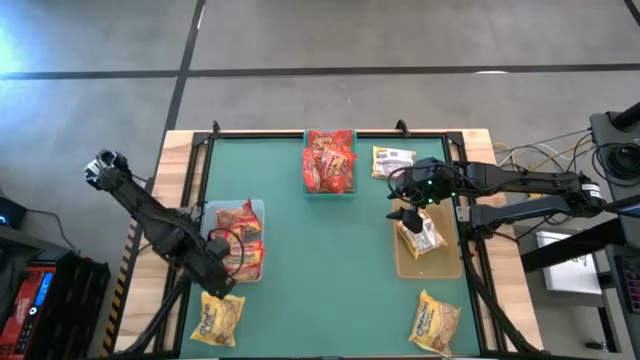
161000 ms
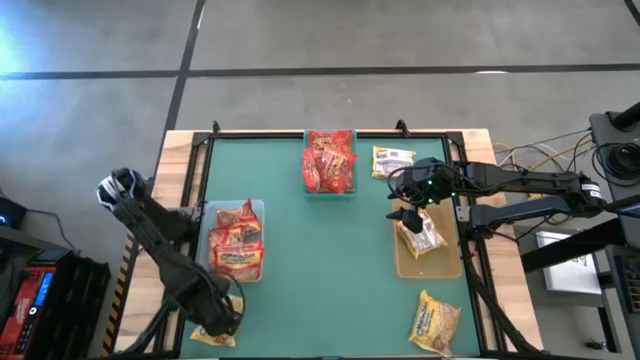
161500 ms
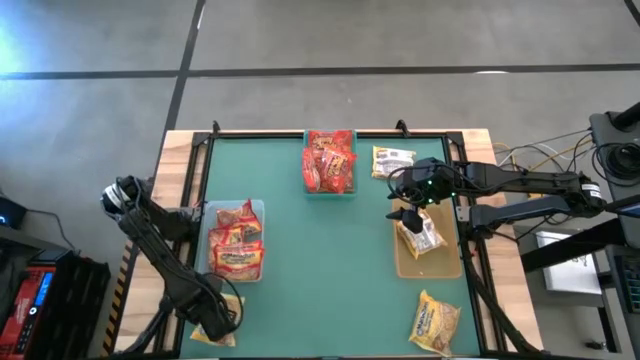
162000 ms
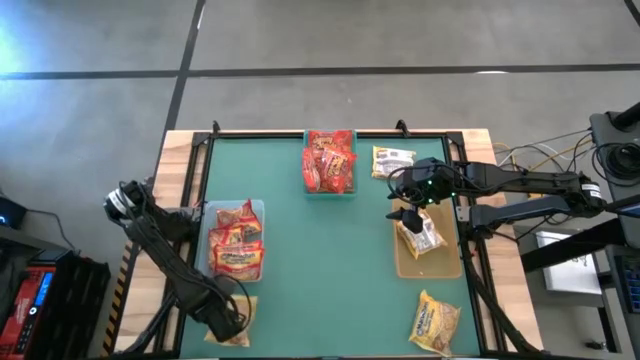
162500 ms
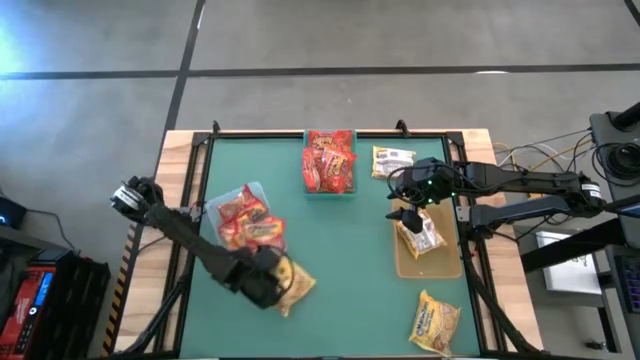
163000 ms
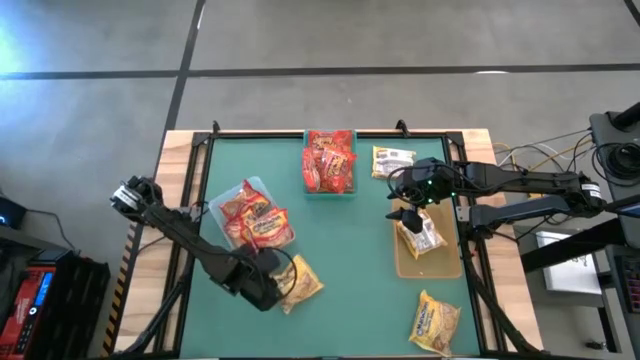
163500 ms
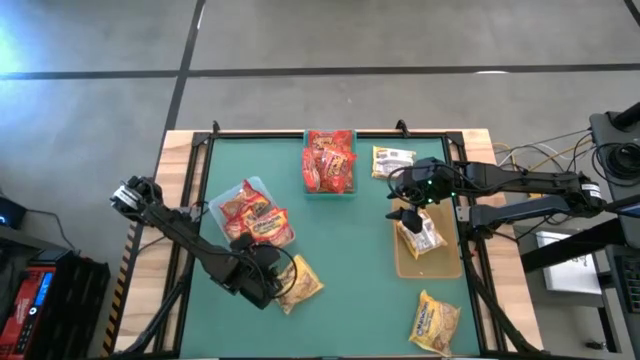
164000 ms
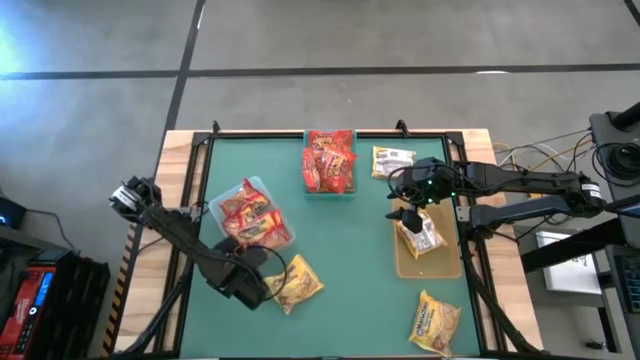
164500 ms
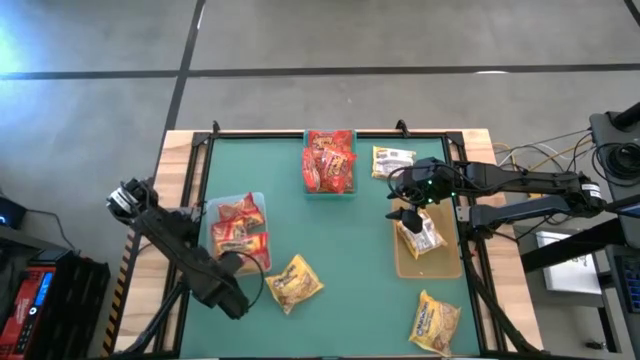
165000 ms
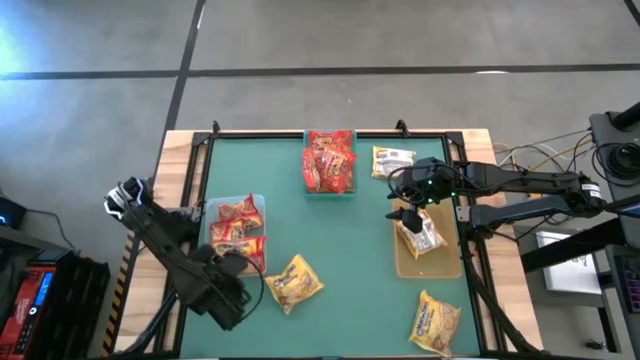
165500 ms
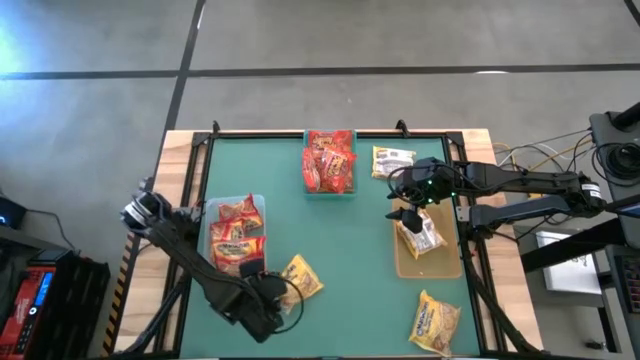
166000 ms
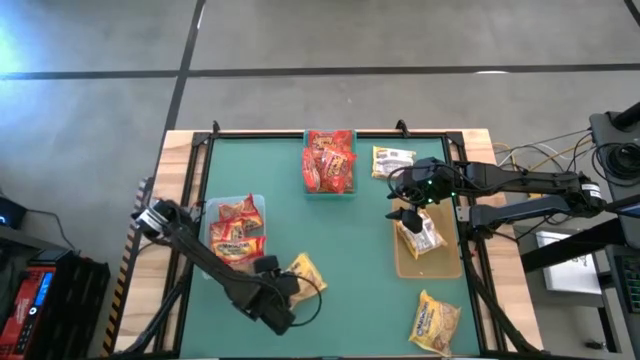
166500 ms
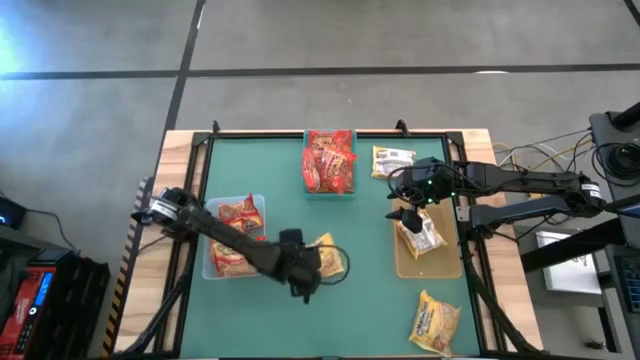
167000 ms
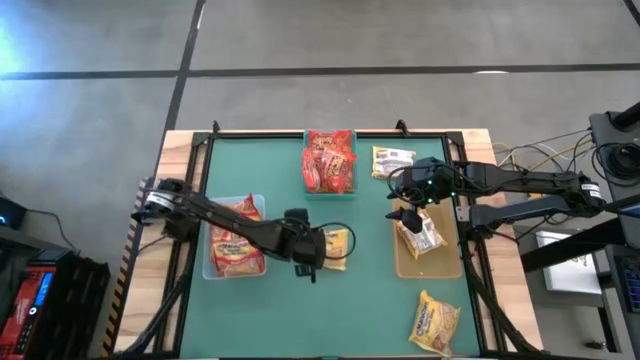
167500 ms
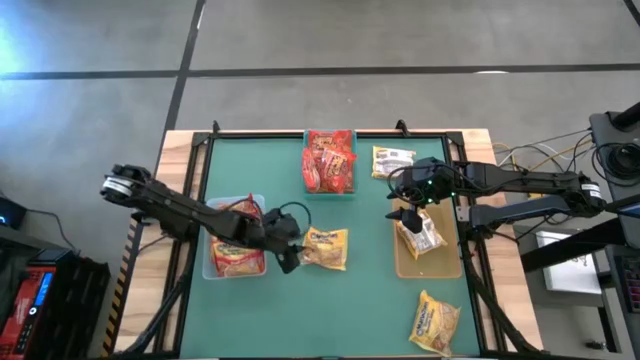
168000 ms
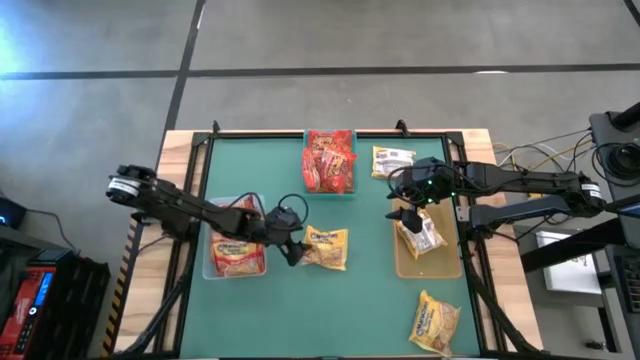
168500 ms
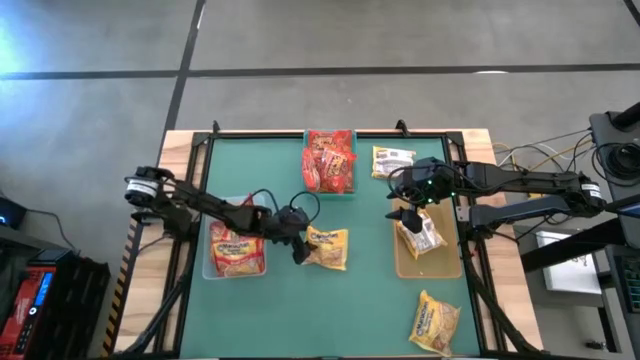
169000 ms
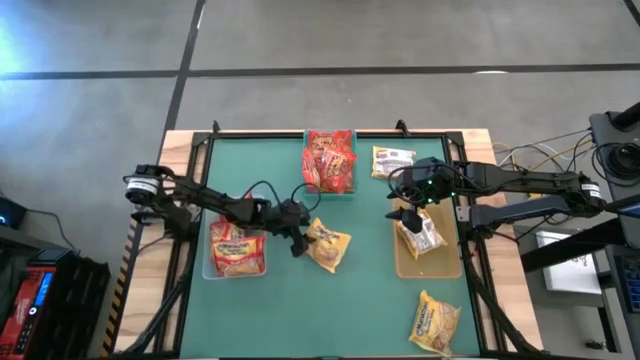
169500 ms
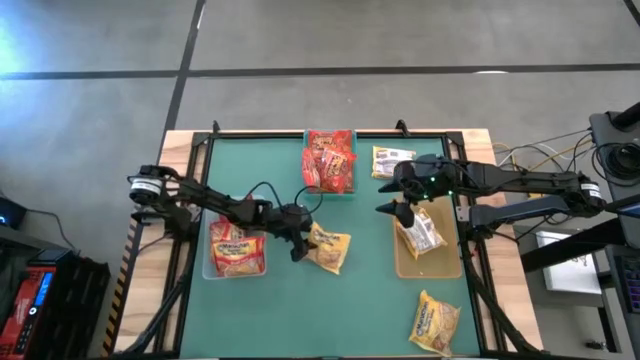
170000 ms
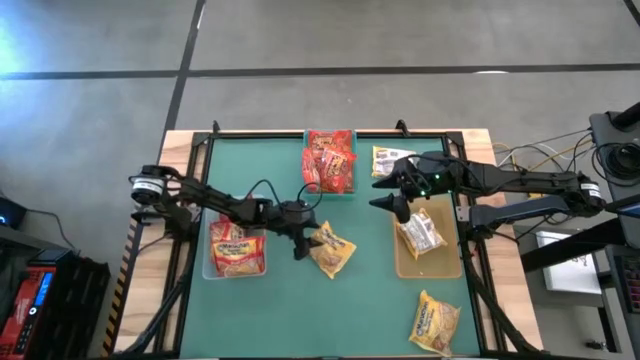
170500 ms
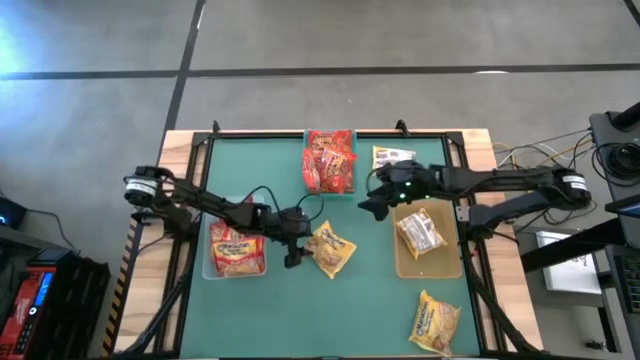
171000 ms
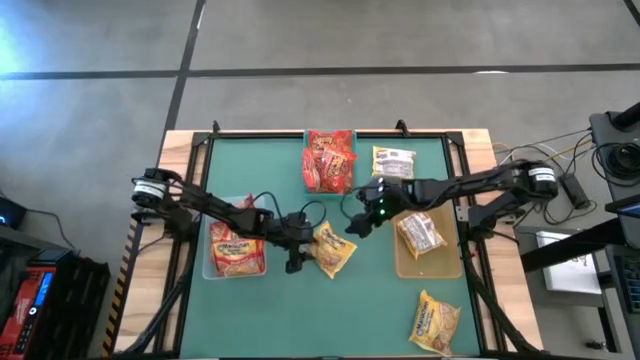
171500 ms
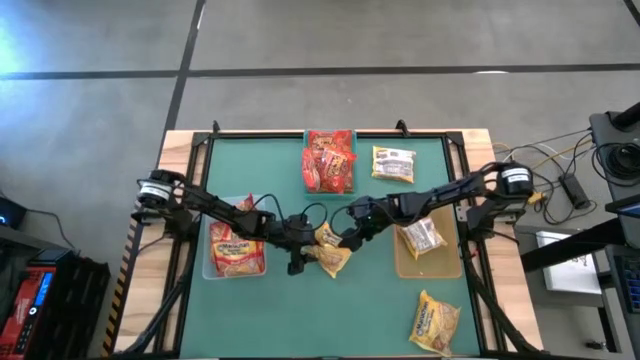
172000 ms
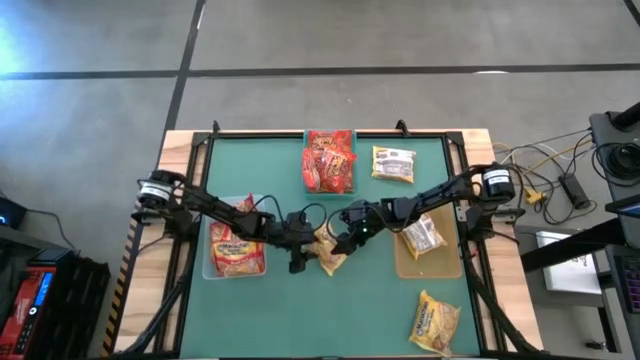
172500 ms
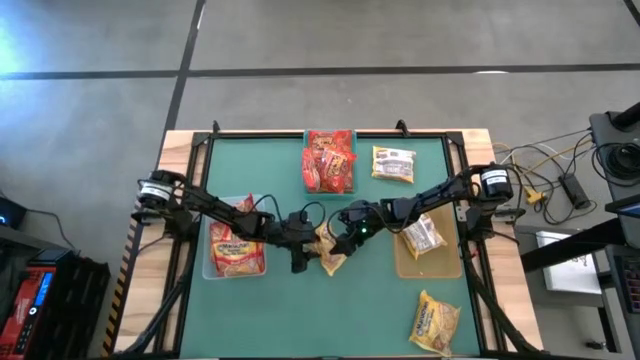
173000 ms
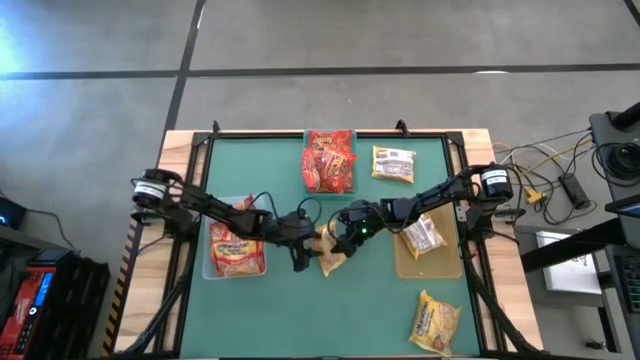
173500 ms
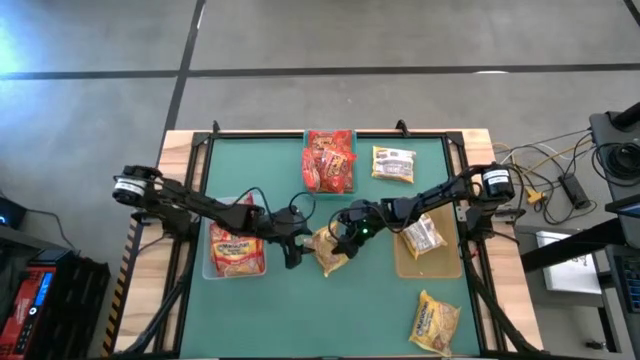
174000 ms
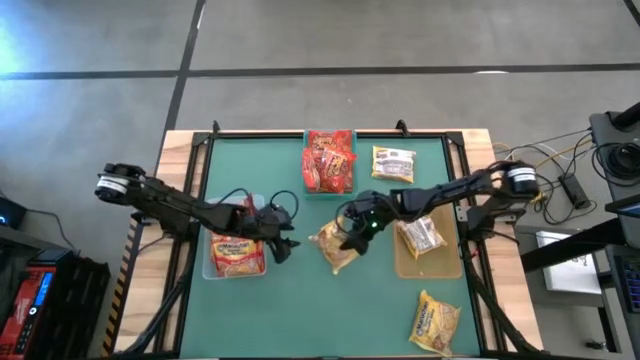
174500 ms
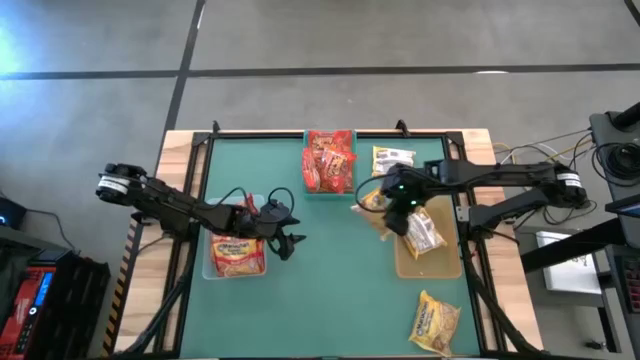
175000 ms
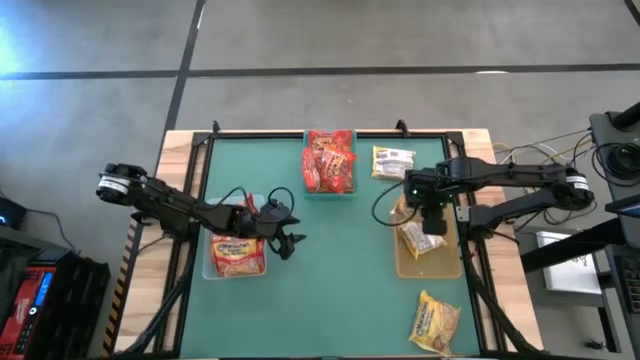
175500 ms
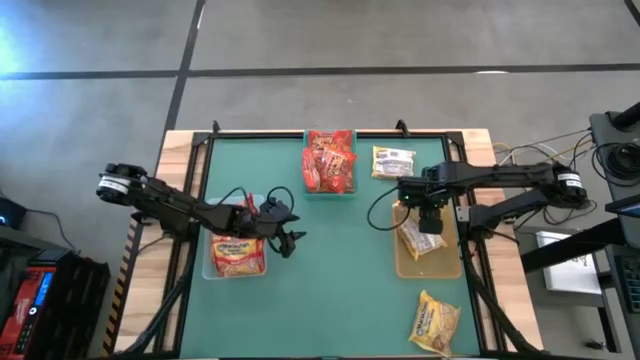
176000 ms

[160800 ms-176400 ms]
Task: Sort Maruchan noodles
Put the yellow noodle pack into the yellow bin

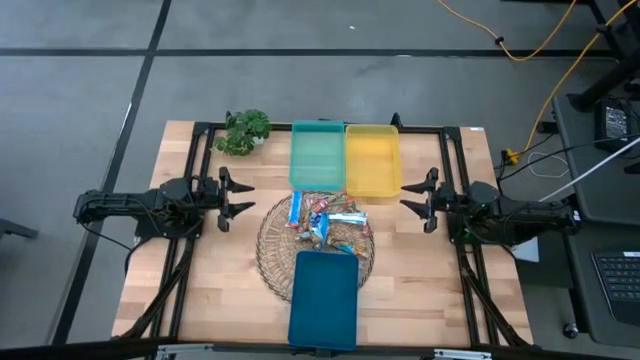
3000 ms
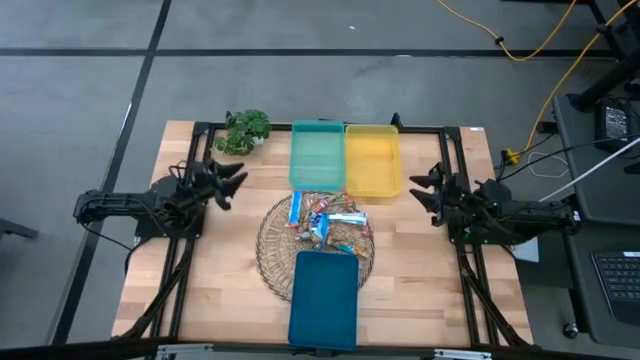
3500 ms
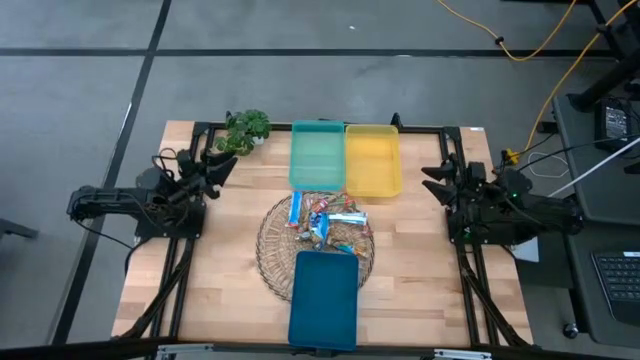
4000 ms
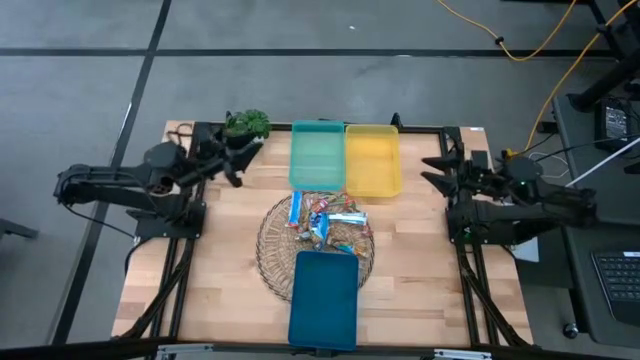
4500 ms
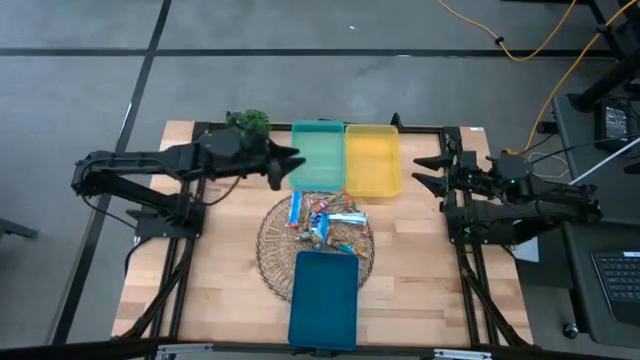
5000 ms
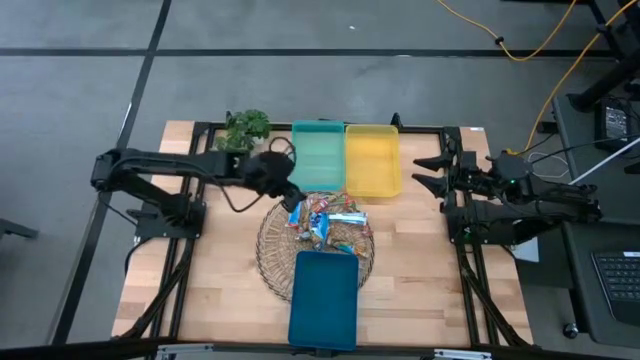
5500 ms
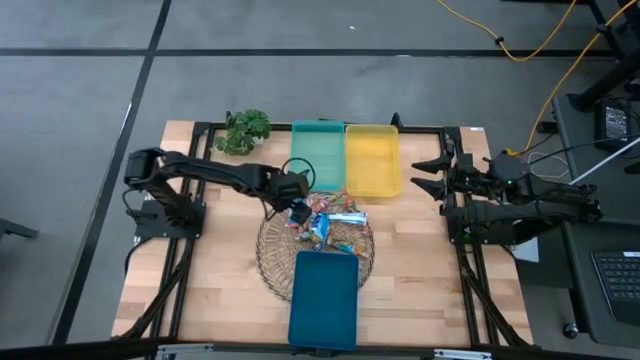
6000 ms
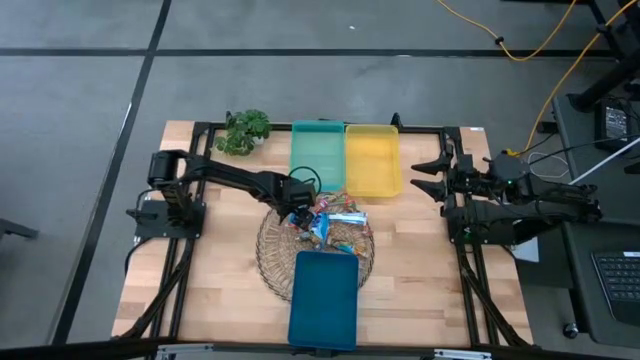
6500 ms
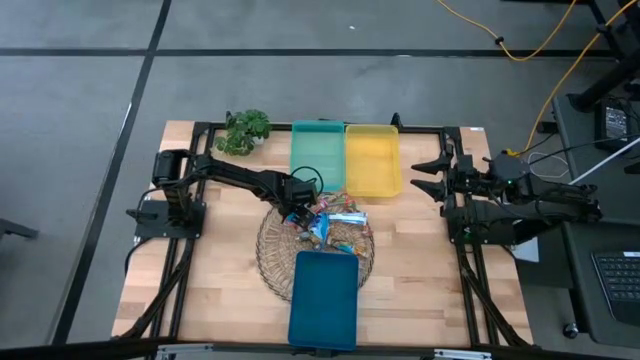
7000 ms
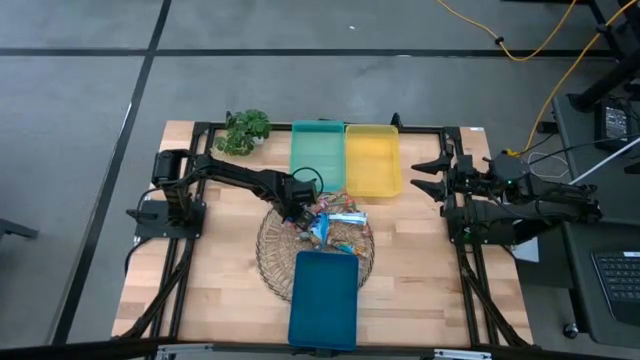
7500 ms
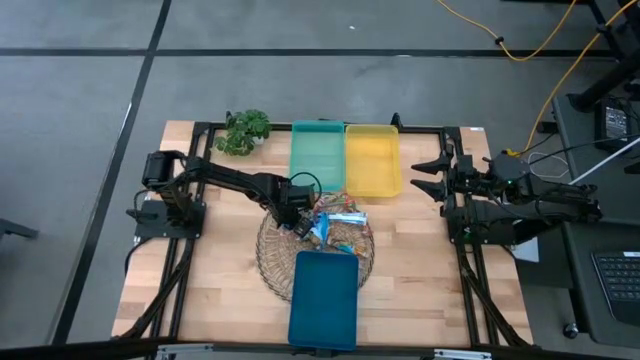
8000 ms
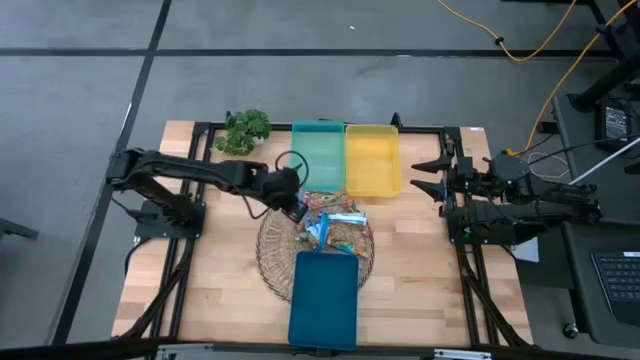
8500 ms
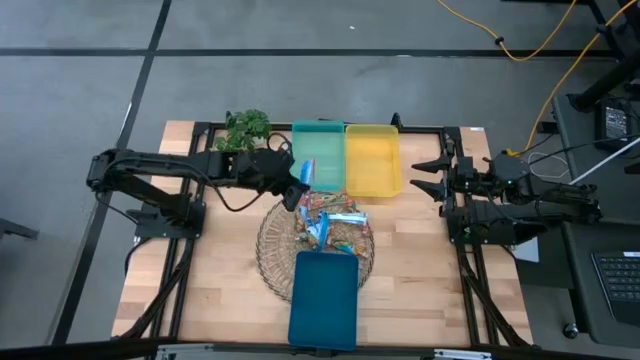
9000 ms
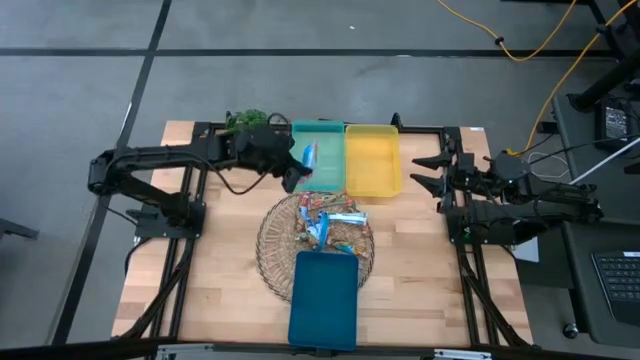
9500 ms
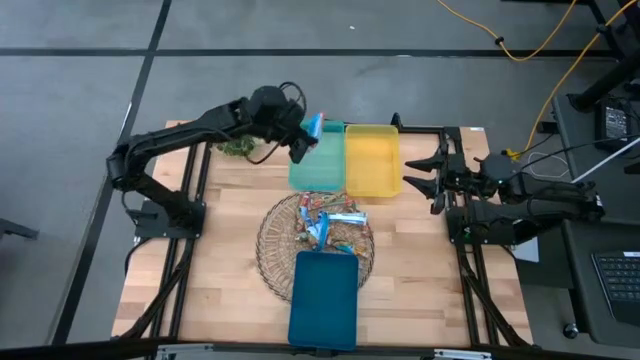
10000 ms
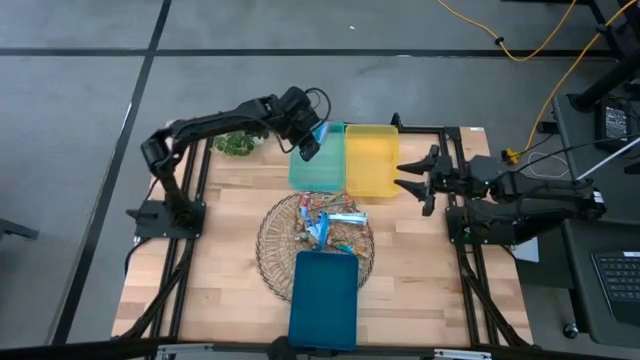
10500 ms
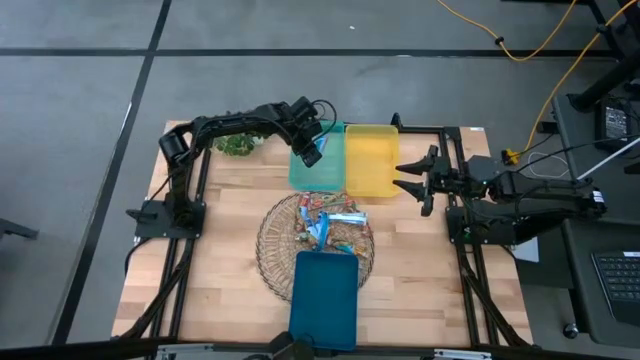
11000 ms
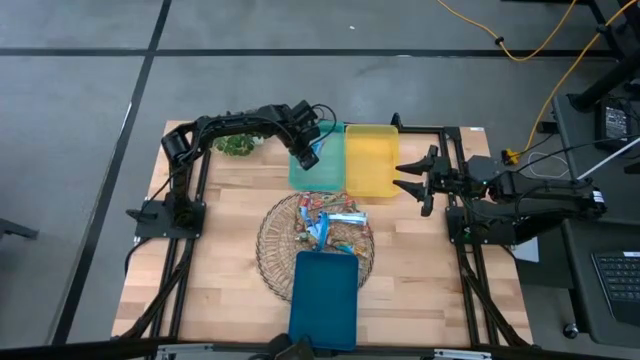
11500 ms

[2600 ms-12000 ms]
Task: Pick and place Granola Bars by type
Put the red granola bar into the green container
